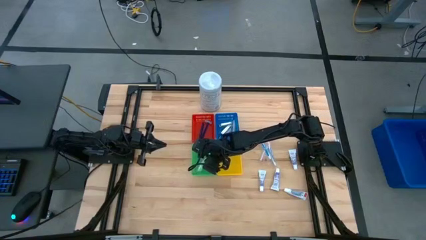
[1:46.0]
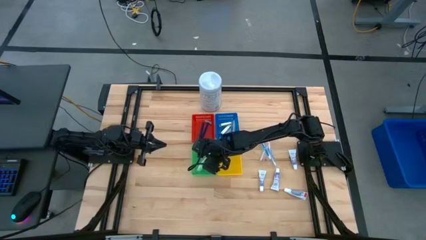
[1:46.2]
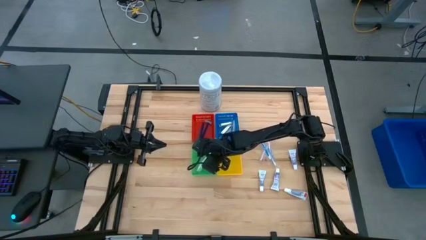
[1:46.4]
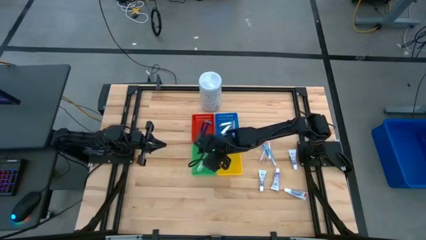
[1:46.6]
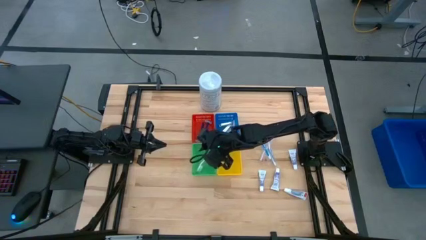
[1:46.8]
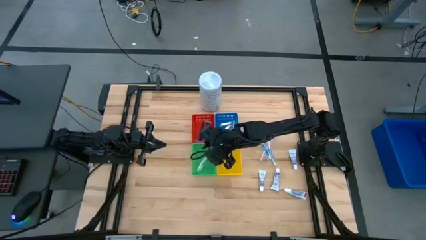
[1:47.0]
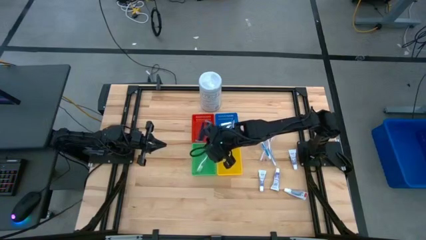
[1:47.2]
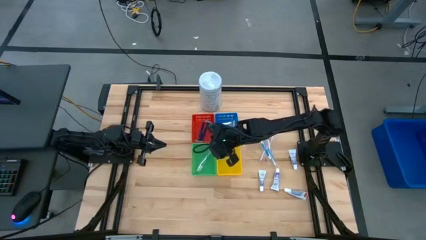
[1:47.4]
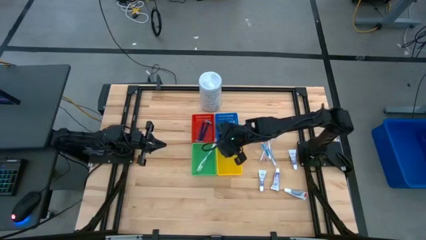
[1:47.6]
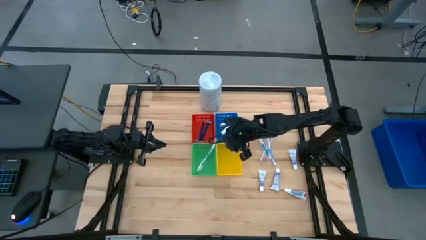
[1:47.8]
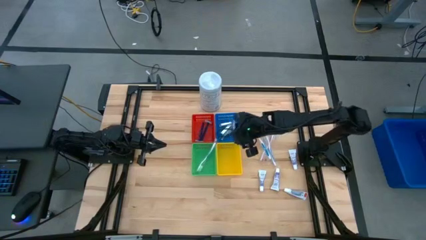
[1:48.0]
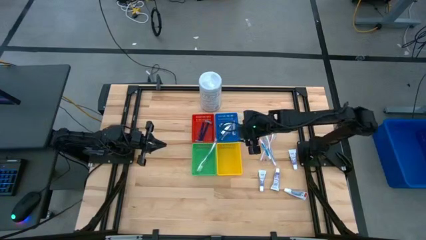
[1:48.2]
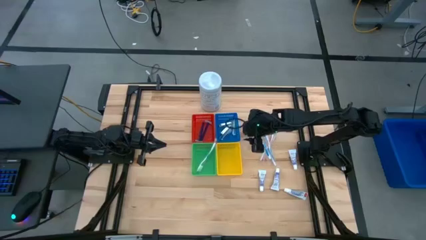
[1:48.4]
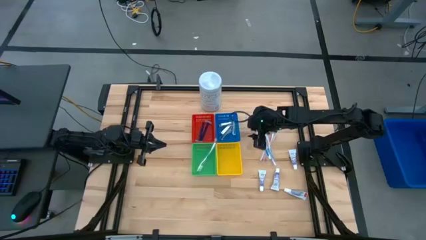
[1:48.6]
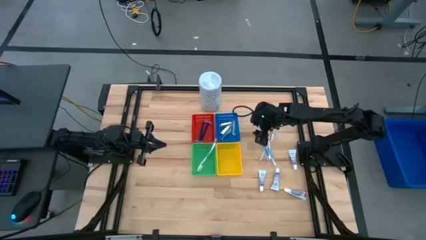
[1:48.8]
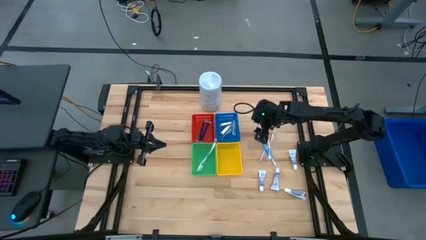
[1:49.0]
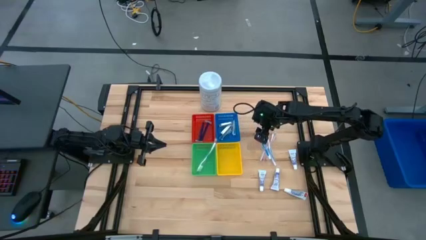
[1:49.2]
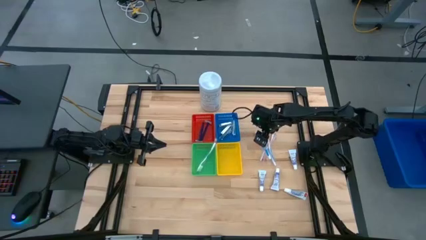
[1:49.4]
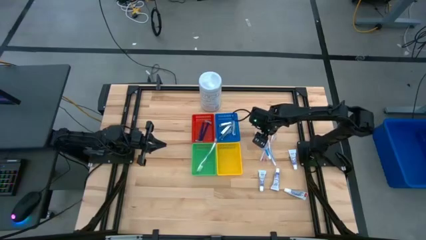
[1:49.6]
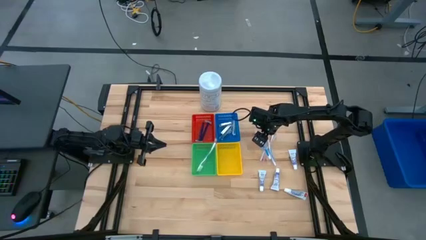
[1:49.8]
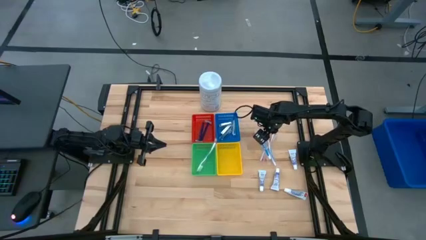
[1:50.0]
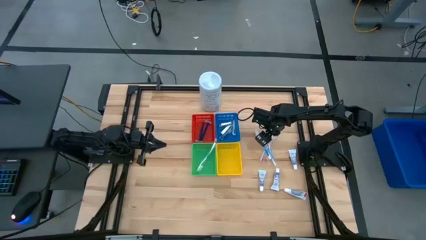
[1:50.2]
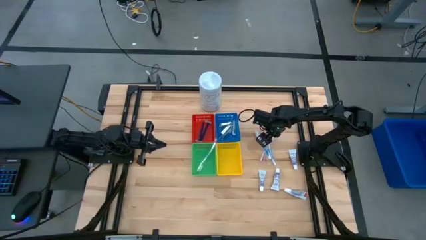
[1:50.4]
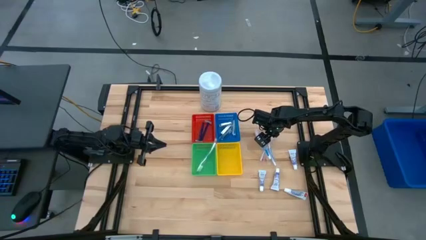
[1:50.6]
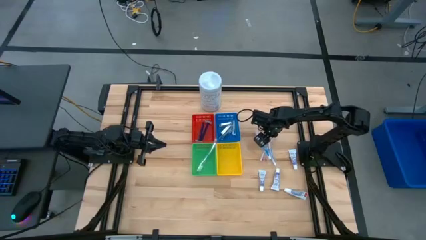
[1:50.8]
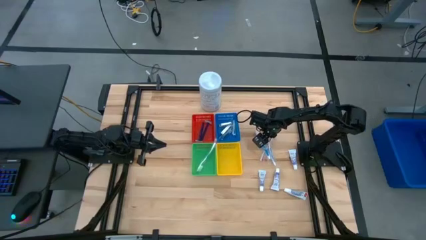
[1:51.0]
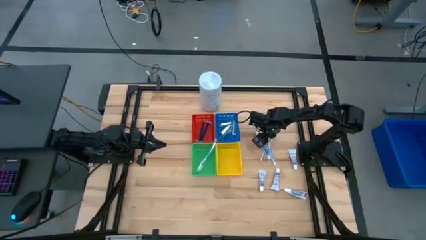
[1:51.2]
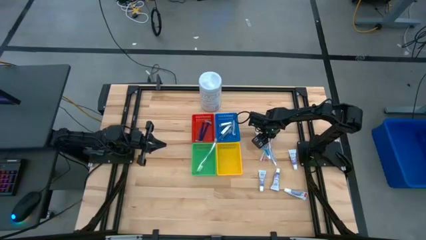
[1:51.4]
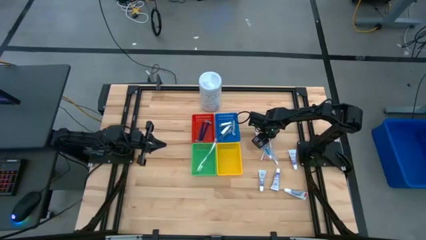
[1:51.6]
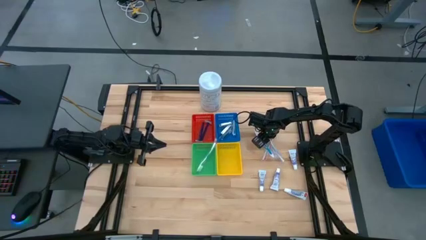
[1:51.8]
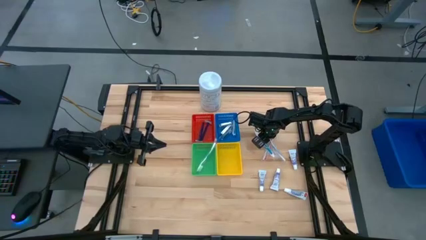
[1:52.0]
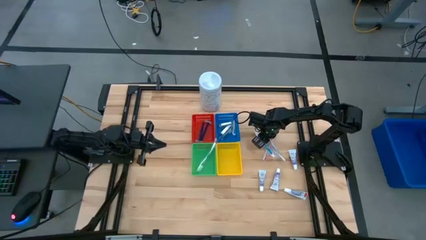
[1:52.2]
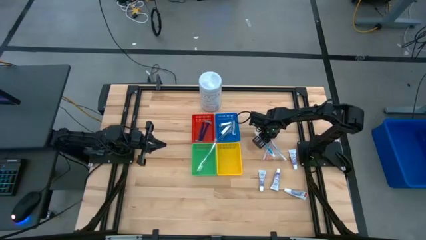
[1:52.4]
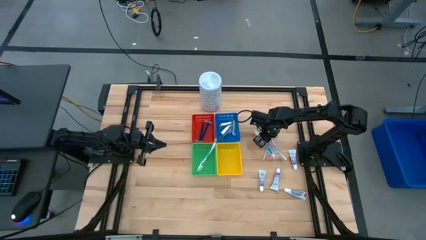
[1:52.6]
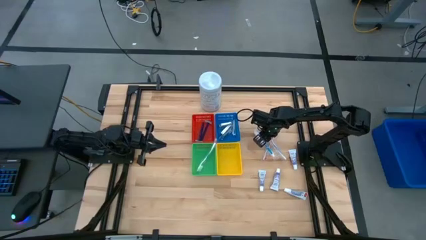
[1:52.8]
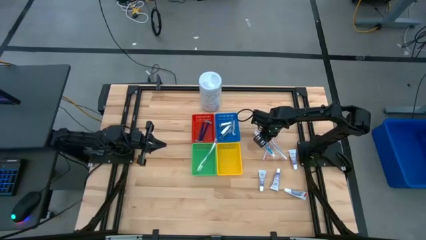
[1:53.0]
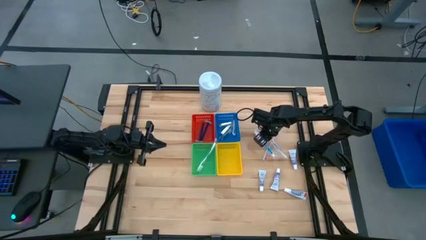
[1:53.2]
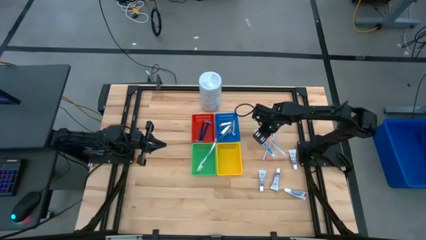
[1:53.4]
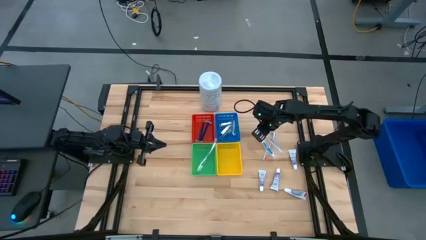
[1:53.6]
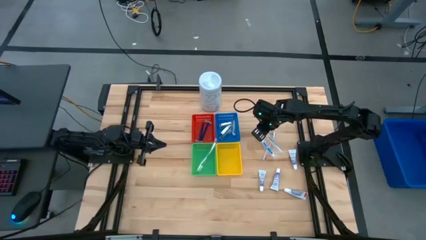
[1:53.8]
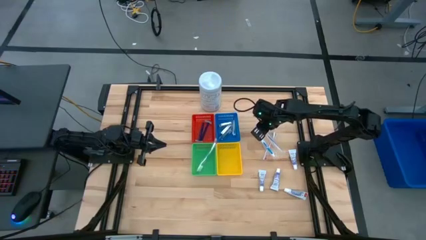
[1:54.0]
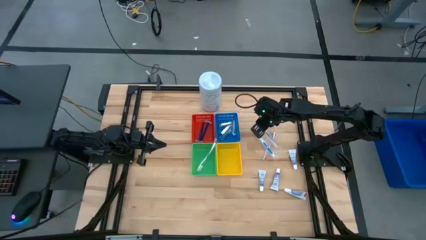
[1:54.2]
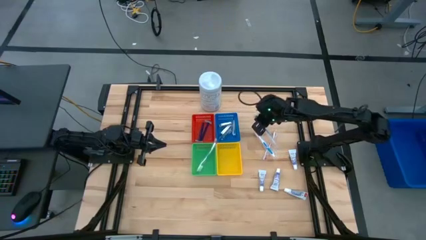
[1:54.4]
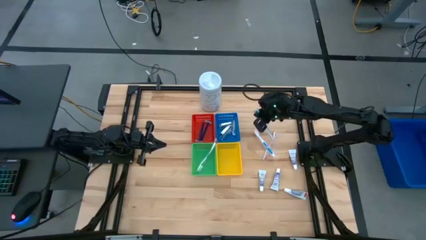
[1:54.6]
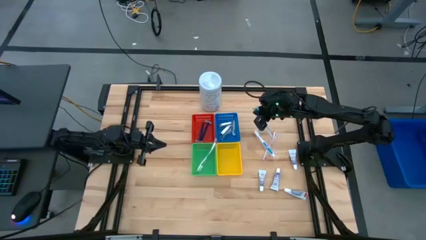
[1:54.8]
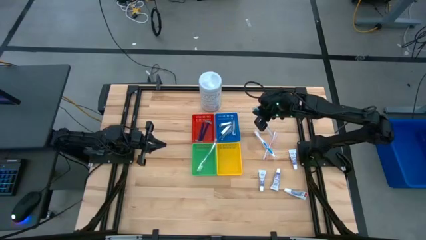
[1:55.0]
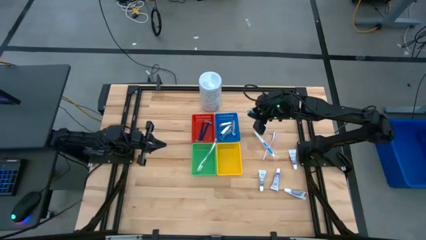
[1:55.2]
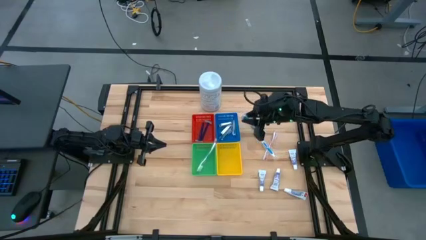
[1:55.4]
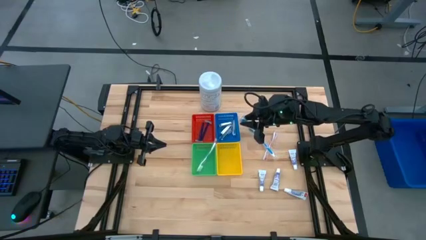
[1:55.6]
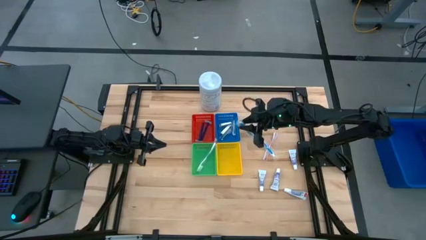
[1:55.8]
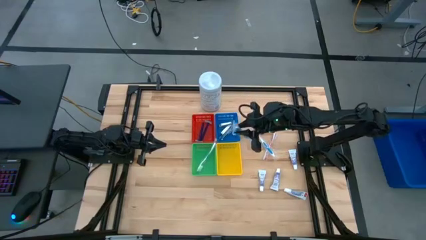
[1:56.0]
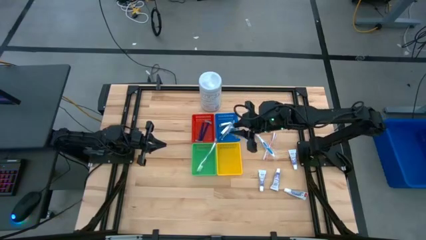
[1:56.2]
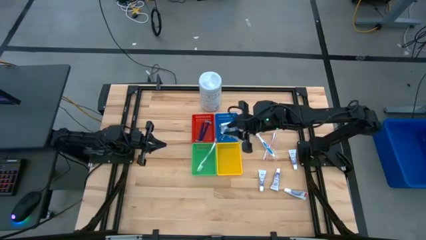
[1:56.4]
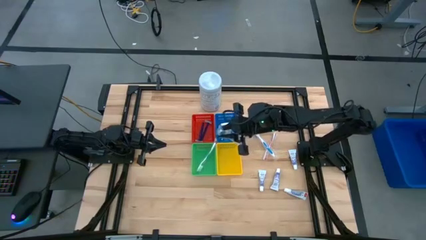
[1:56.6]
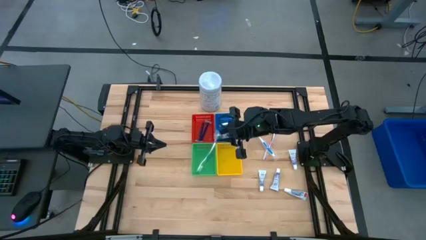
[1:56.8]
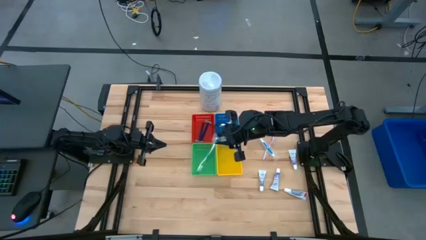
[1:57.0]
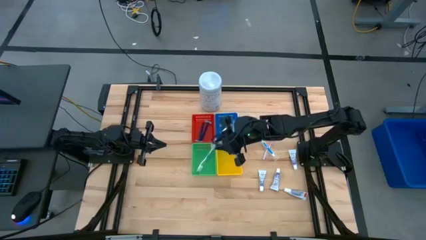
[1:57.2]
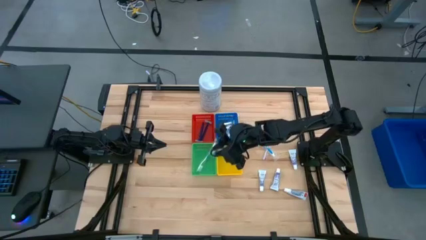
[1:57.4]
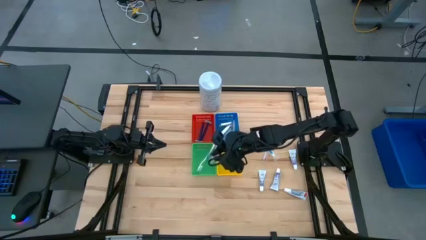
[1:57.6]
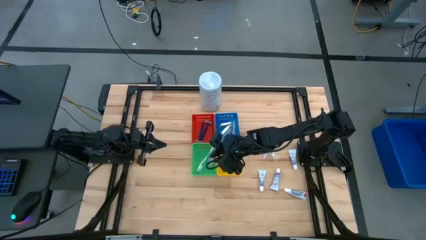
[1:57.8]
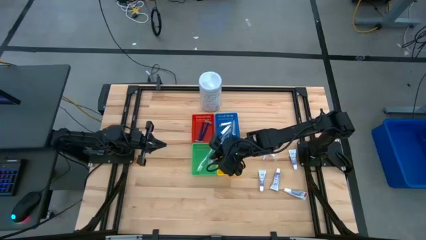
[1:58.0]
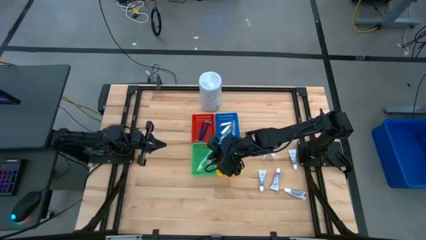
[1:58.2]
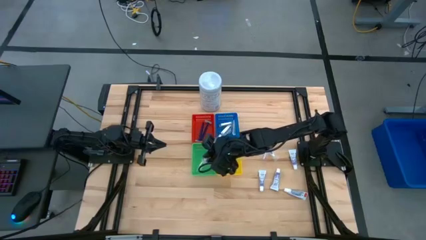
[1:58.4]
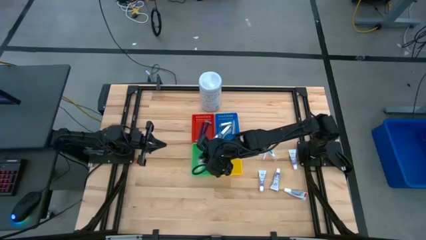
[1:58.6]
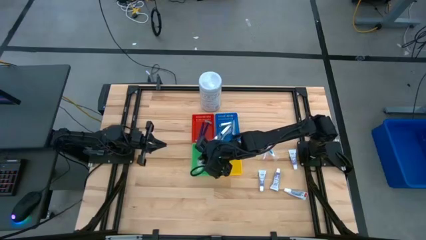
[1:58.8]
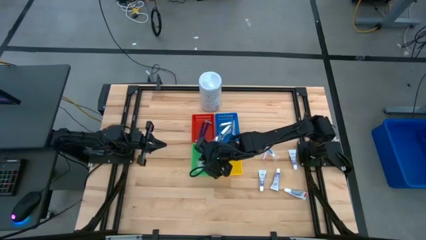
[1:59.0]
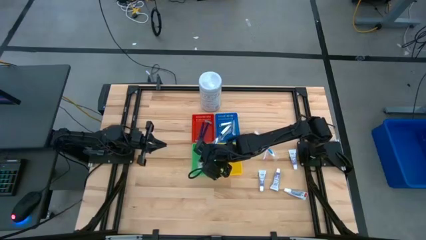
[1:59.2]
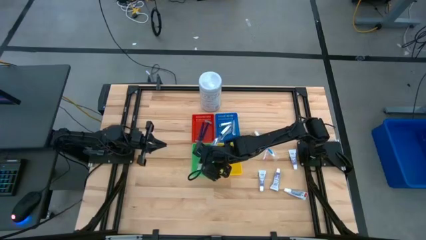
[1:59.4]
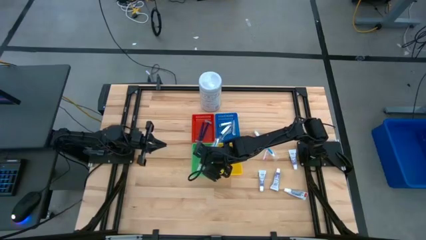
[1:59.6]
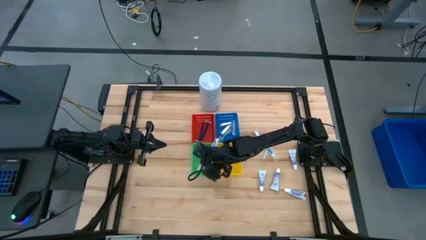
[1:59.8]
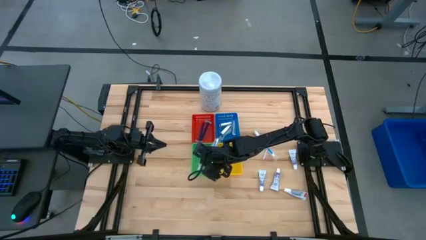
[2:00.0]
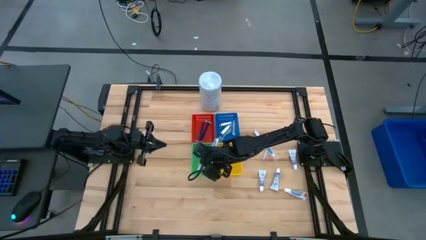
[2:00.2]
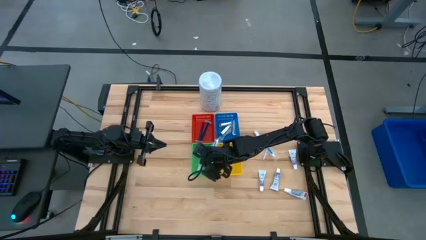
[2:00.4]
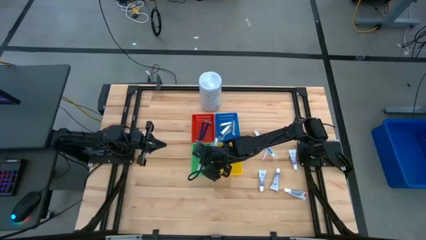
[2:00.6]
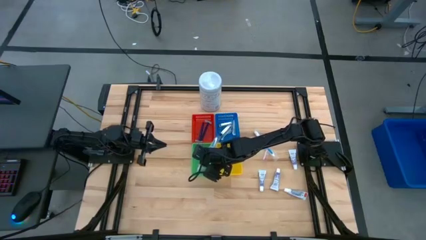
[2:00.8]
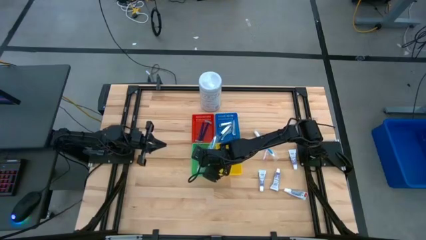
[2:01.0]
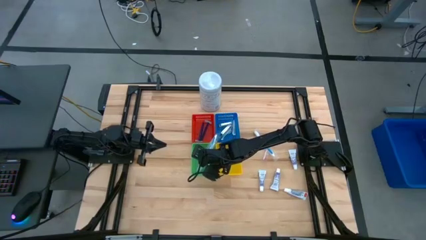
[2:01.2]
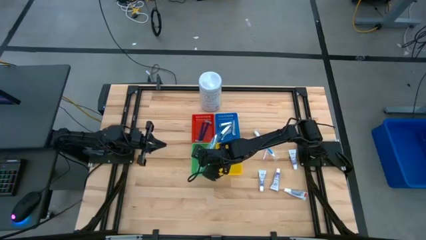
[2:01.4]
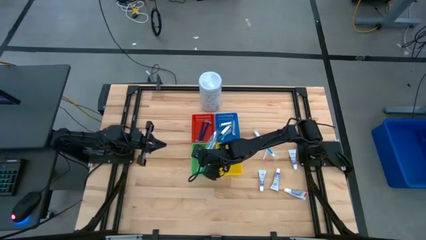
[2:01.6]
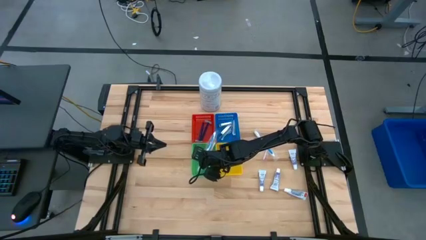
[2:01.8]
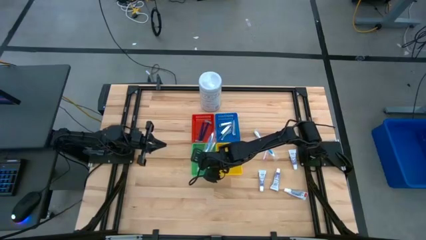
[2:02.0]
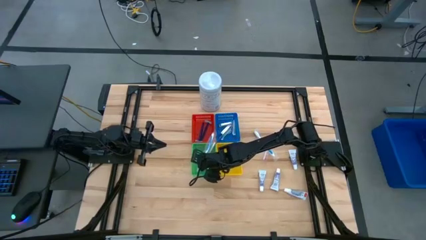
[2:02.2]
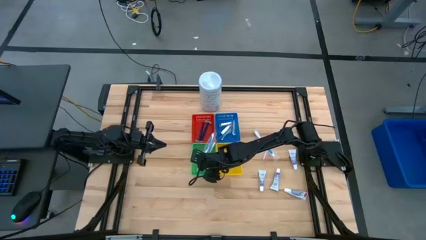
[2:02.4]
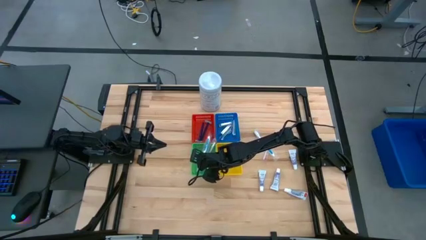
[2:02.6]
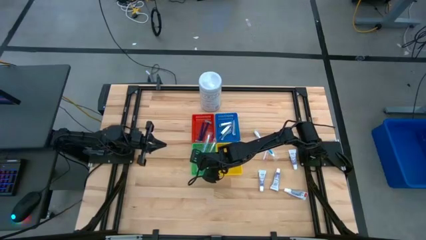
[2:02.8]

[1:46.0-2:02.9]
Task: Pick & Place Travel size toiletries
Put the right blue toothbrush into the green bin
